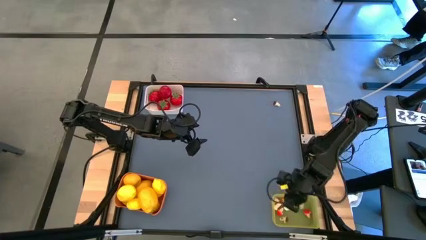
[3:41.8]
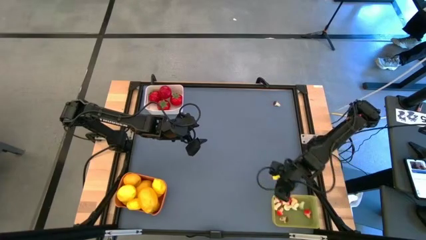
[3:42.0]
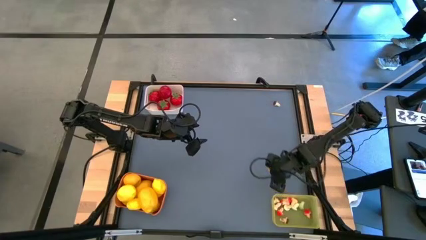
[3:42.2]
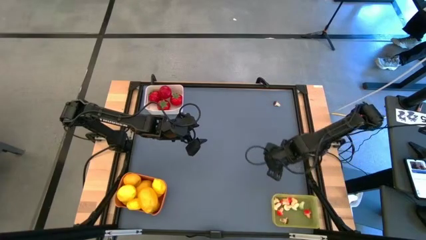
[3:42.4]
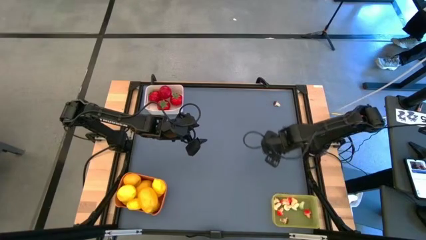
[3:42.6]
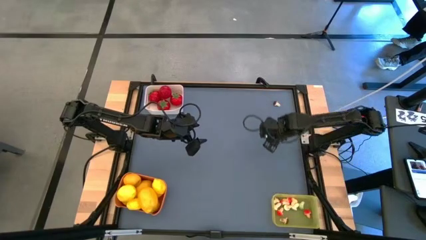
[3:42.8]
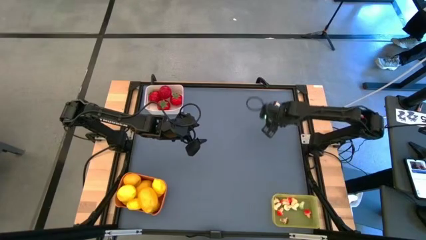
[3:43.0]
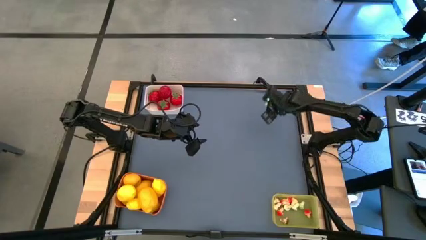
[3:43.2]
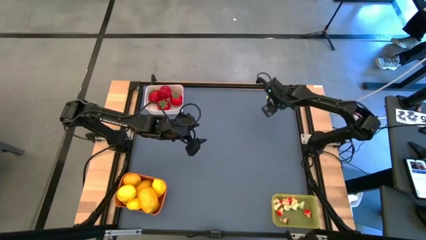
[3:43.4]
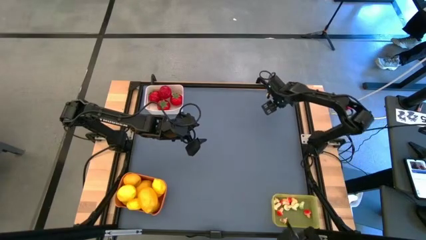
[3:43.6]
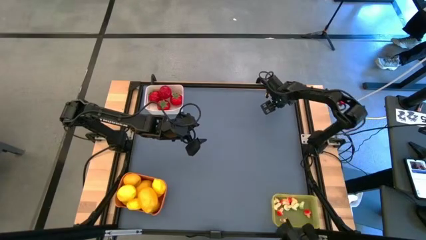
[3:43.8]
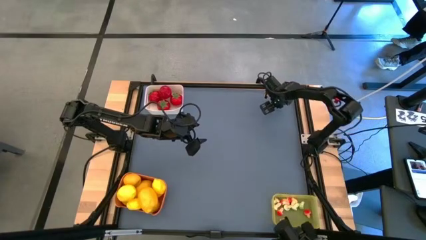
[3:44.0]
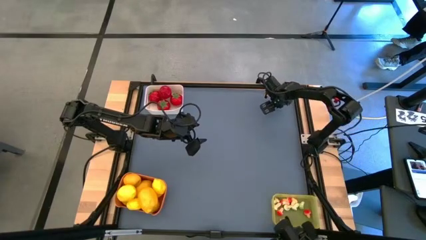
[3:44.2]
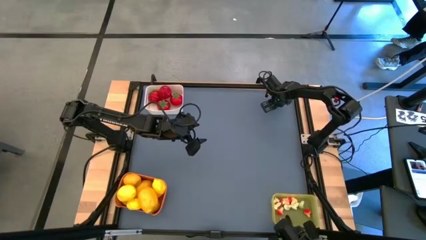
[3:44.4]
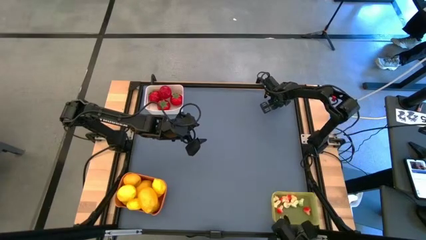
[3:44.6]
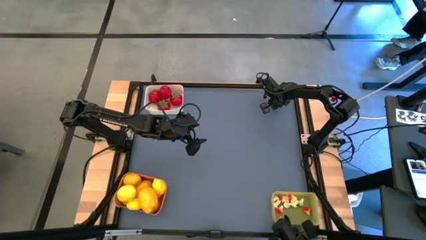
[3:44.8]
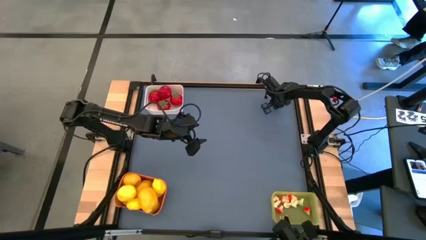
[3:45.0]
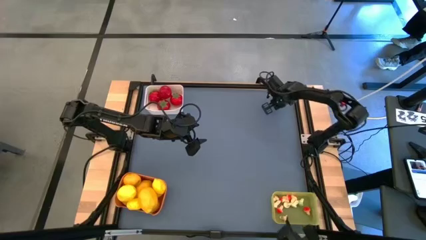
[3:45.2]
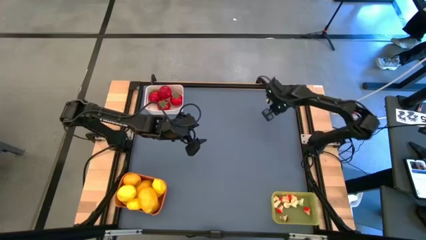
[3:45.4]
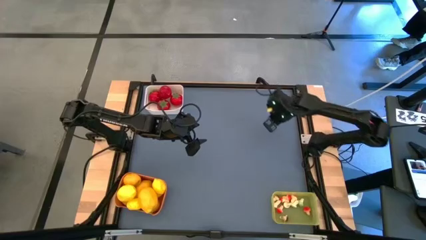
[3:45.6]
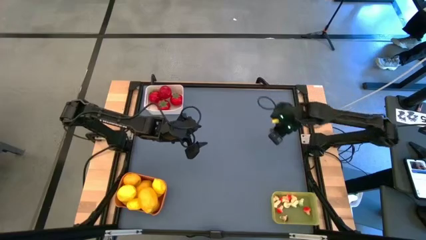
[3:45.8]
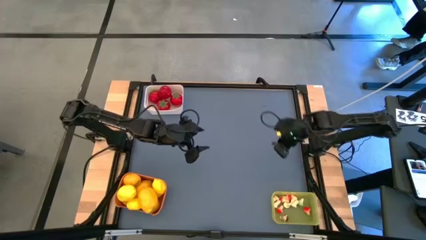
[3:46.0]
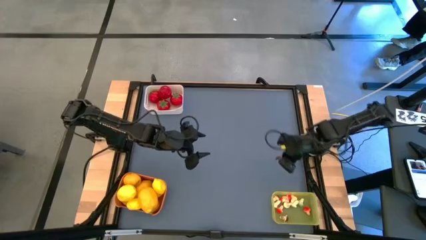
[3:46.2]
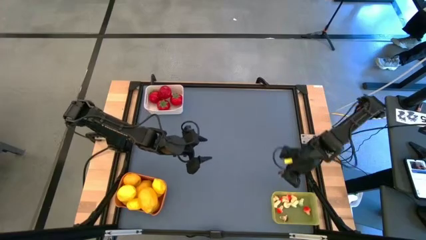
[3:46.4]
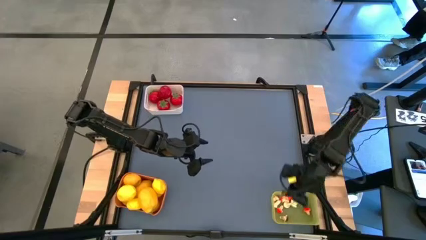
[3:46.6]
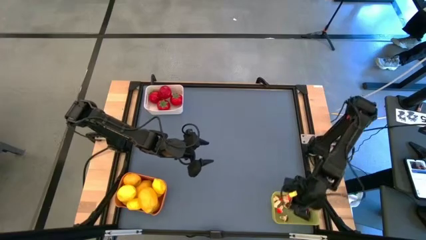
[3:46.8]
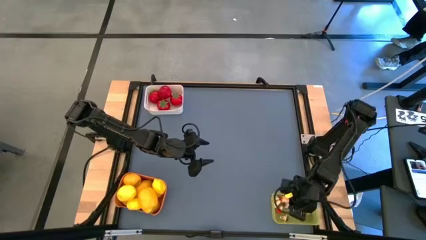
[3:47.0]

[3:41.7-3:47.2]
Task: Sort produce into baskets
Put the brown mushroom into the yellow bin

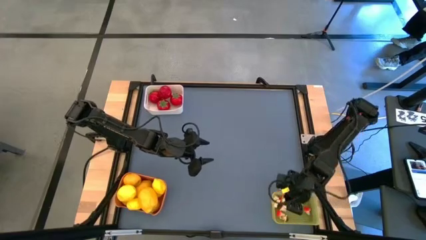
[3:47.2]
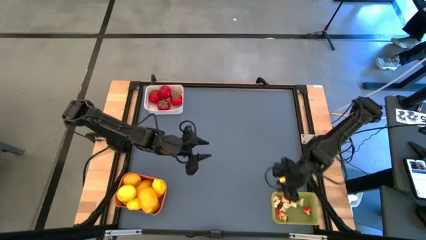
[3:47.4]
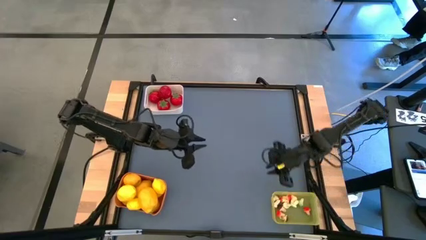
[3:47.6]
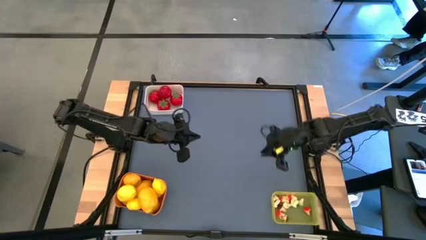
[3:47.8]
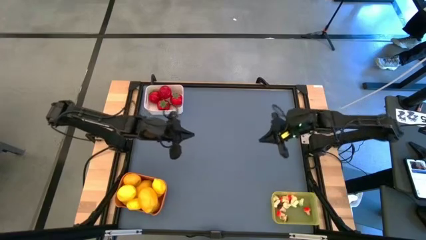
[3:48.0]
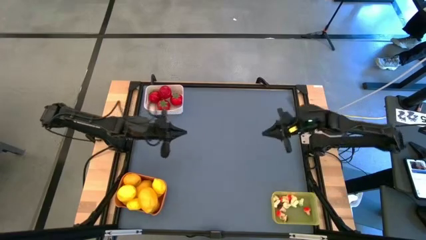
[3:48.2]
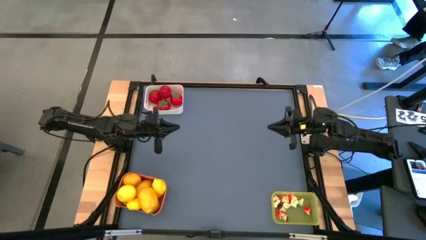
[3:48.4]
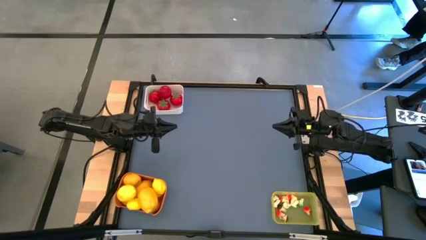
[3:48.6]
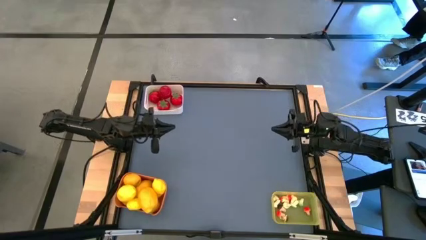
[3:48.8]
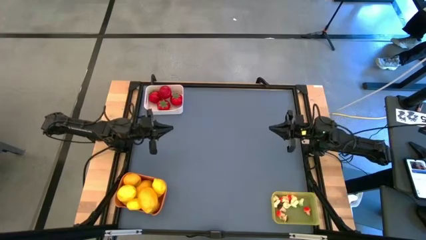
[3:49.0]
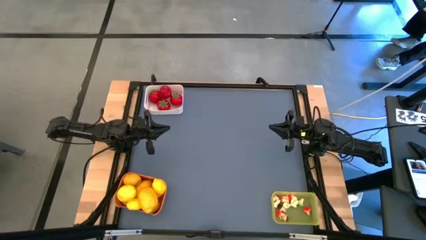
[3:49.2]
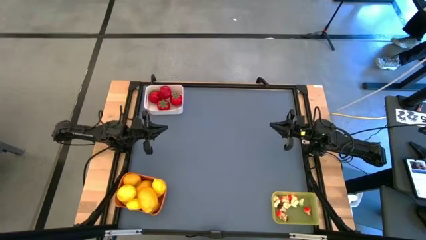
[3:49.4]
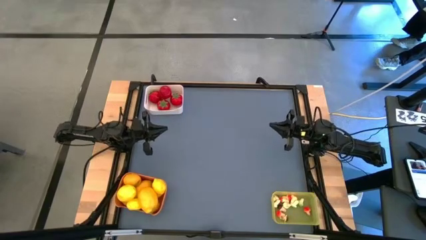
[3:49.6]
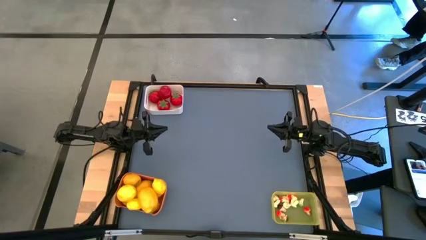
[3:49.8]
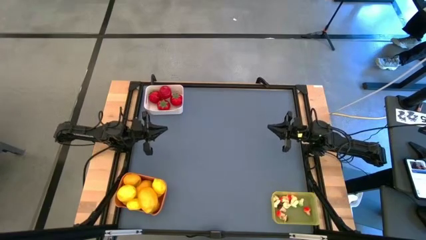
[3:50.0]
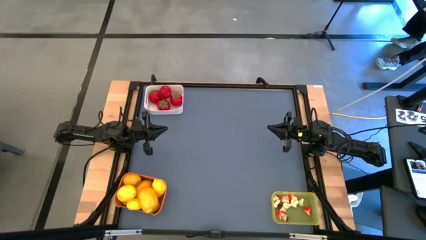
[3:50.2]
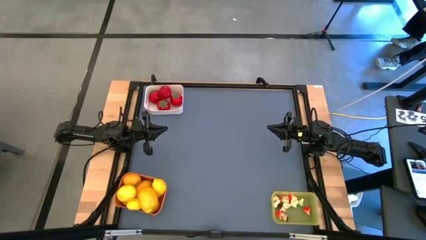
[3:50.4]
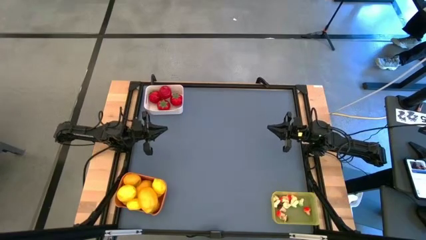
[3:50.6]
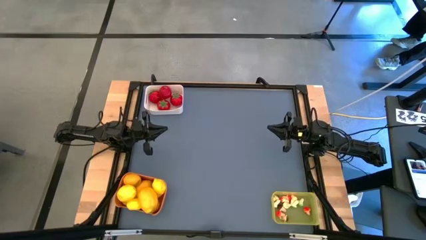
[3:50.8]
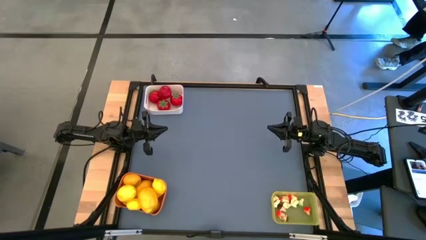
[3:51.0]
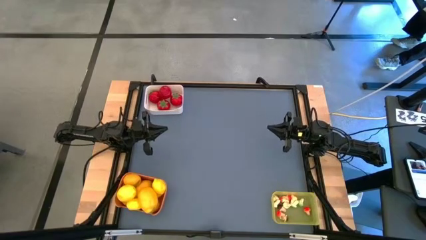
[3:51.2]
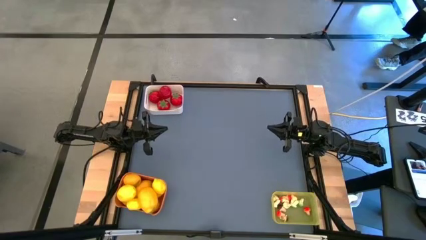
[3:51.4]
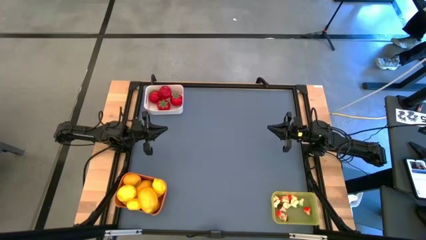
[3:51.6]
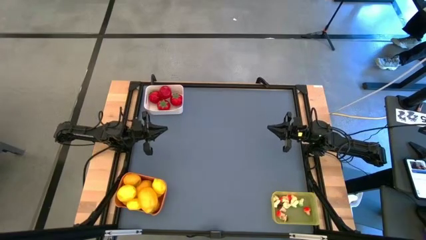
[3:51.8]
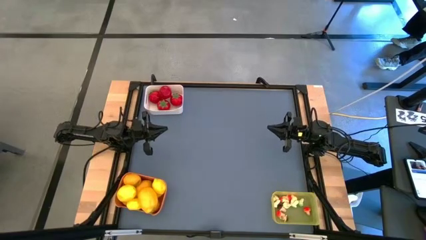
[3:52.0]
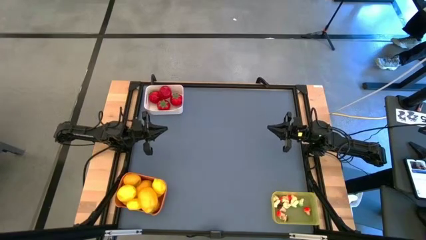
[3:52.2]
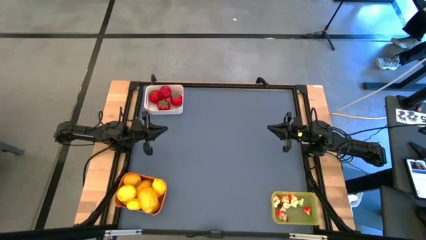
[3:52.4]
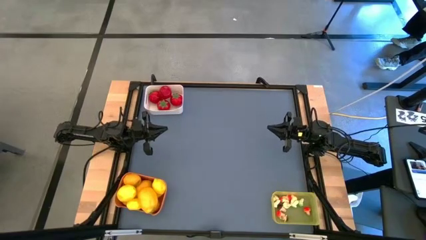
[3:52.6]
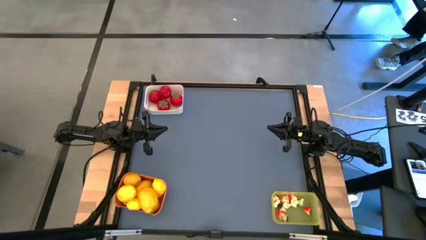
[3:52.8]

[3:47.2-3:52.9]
Return to Home Position

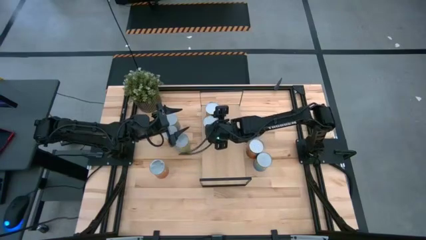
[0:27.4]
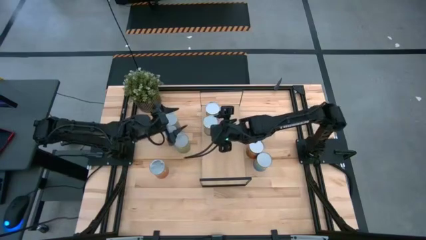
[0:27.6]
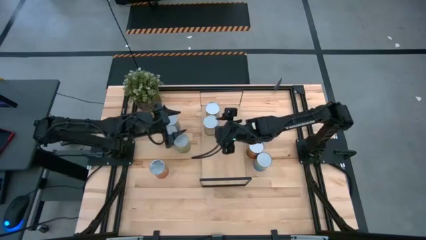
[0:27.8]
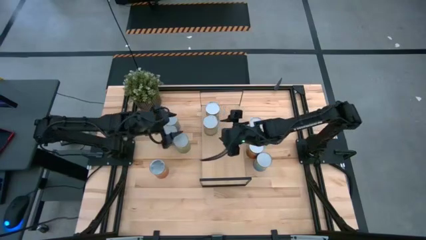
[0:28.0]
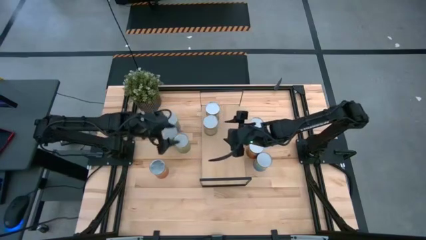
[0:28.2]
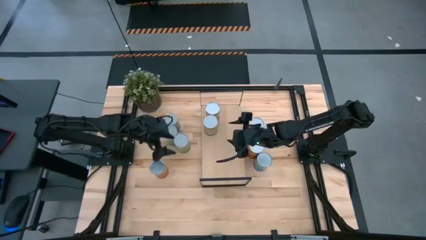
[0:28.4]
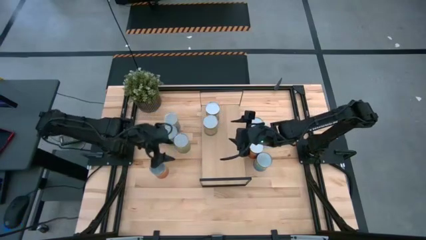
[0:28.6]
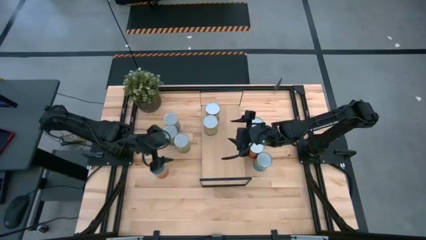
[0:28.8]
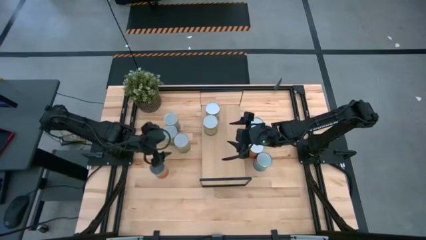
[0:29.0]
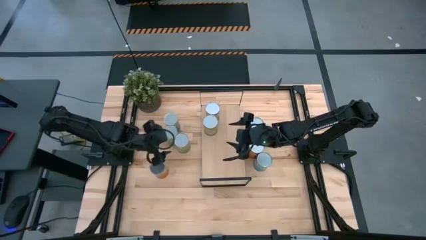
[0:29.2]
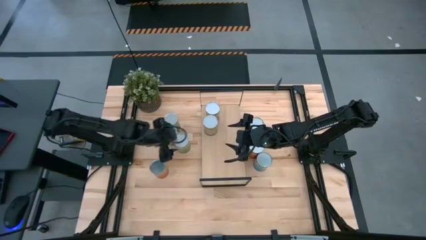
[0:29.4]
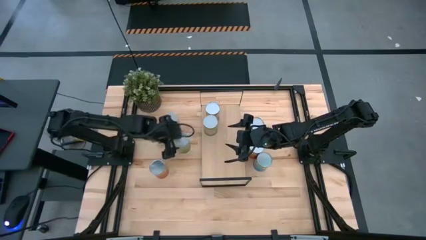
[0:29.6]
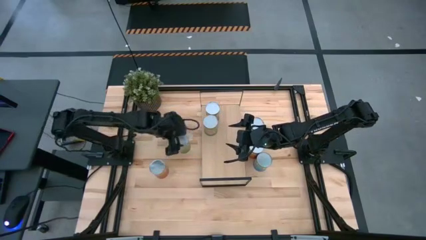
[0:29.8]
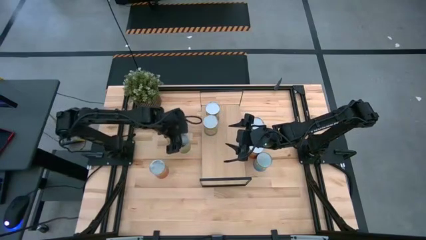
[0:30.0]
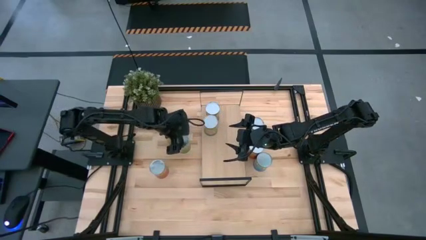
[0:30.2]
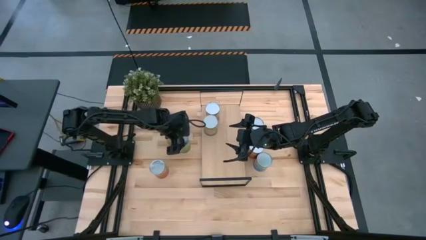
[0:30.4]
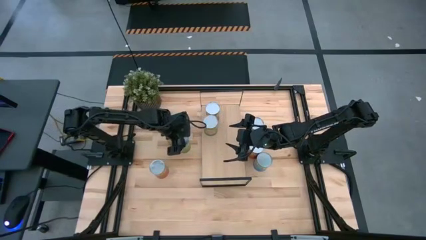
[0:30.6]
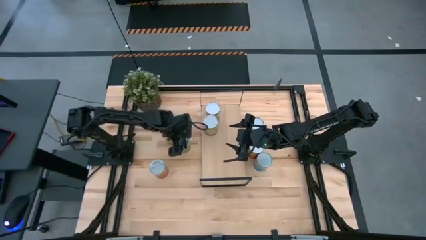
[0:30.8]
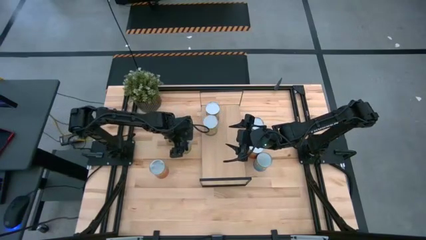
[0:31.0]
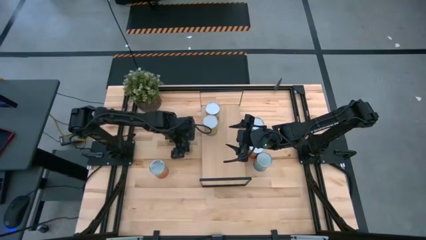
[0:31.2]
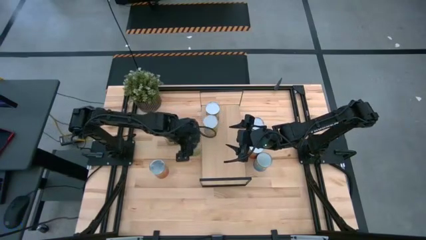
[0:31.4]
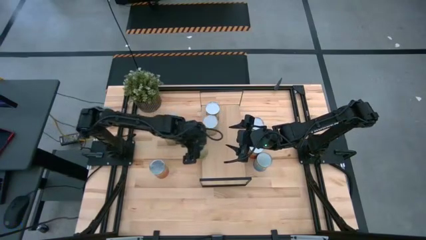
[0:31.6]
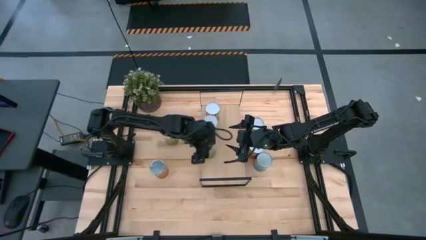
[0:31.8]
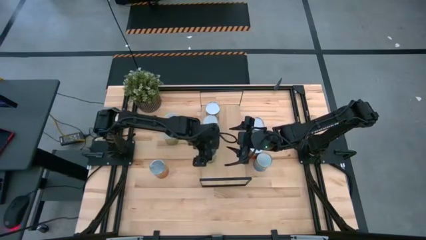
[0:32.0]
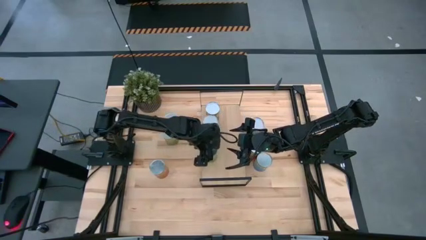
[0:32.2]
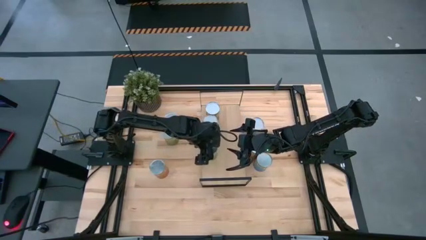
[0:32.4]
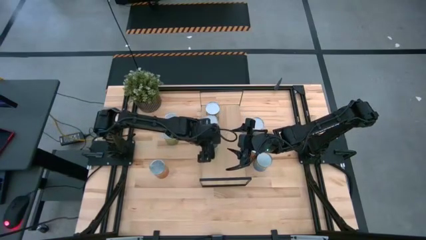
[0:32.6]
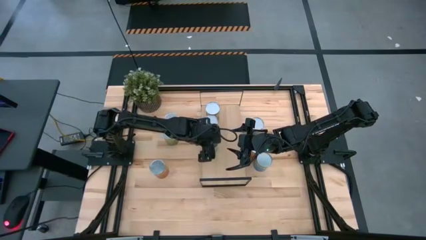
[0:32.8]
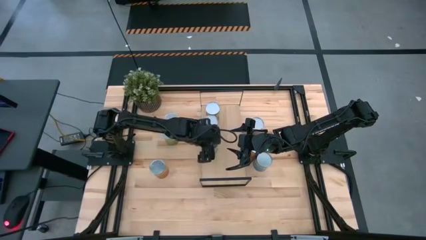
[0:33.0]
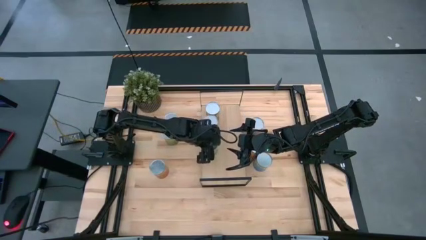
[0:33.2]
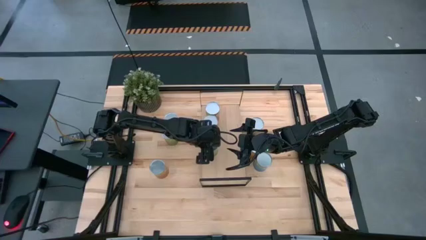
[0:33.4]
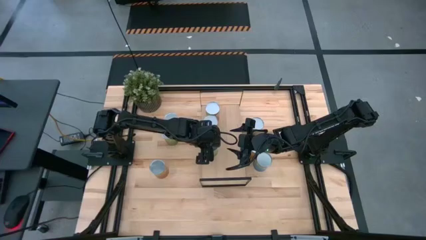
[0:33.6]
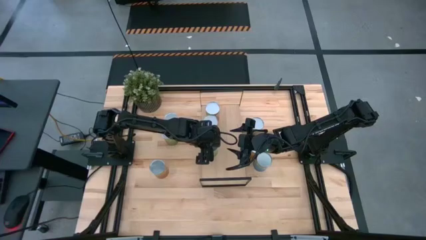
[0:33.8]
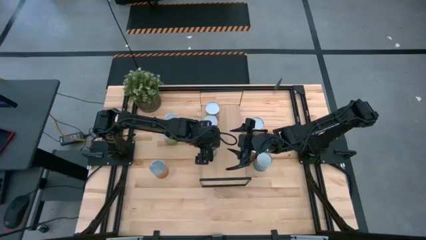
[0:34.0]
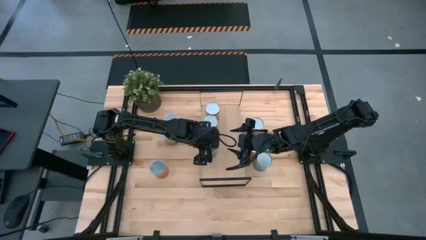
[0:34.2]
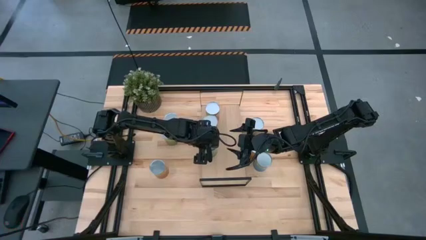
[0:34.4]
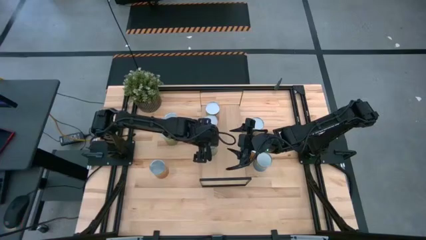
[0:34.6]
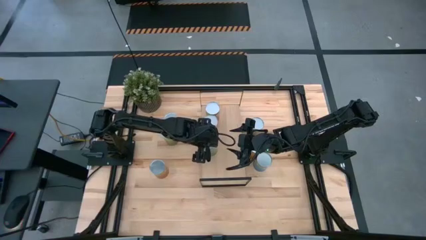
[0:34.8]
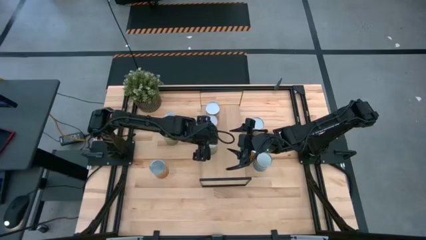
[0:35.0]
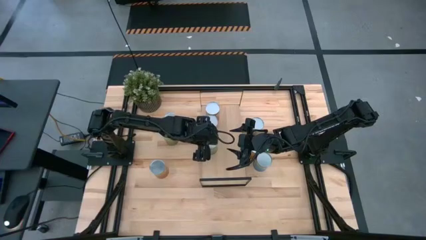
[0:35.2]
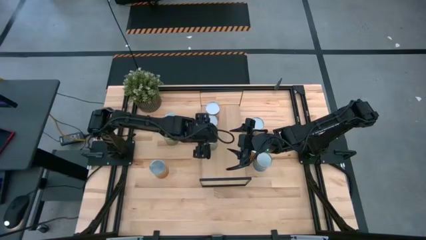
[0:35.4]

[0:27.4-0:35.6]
Task: Pick and place cans onto a shelf
Put the canned pears on the shelf
